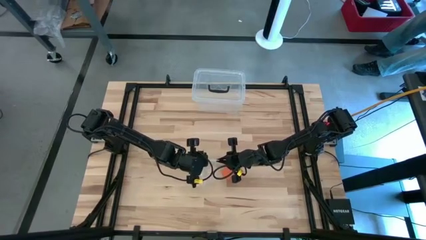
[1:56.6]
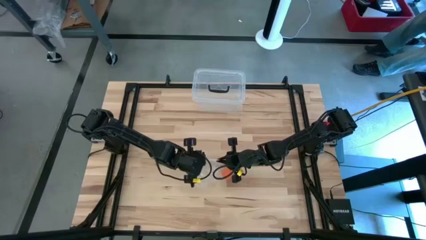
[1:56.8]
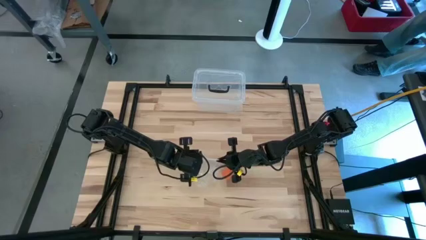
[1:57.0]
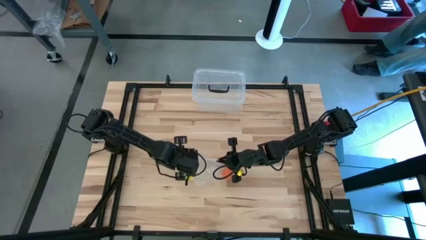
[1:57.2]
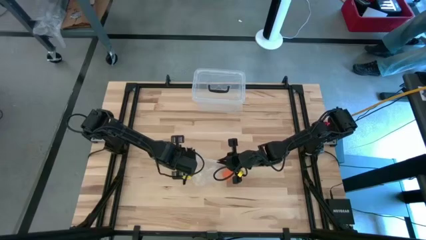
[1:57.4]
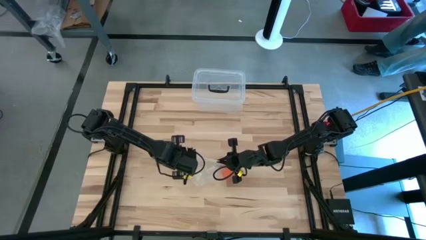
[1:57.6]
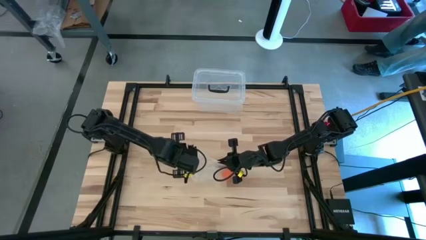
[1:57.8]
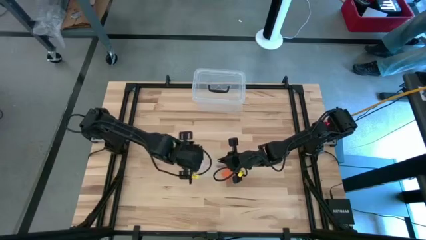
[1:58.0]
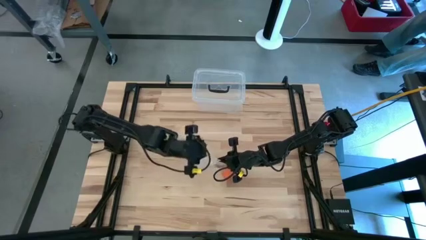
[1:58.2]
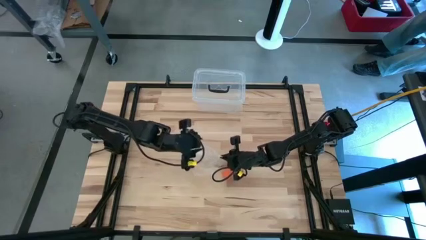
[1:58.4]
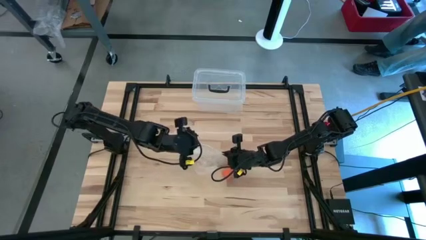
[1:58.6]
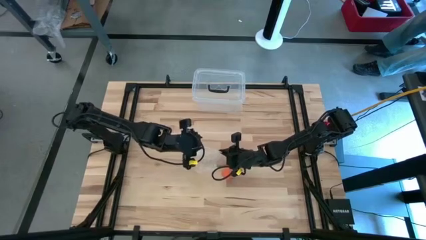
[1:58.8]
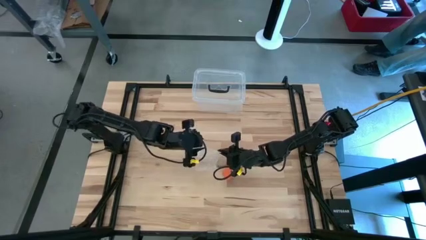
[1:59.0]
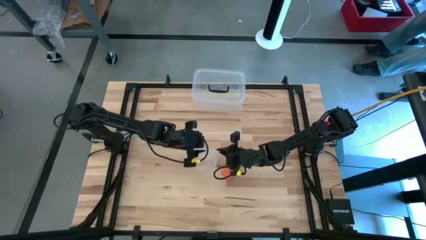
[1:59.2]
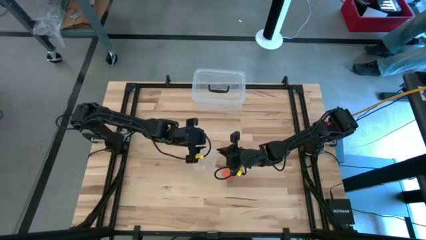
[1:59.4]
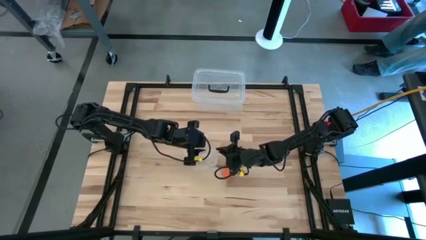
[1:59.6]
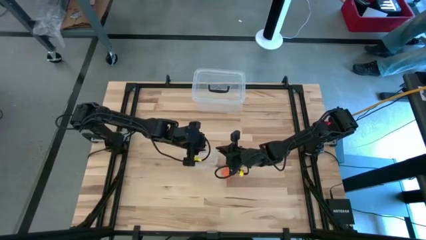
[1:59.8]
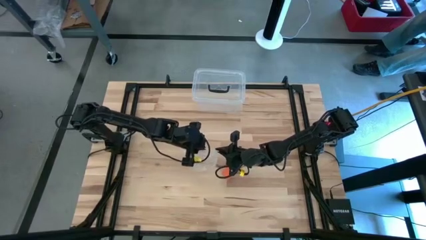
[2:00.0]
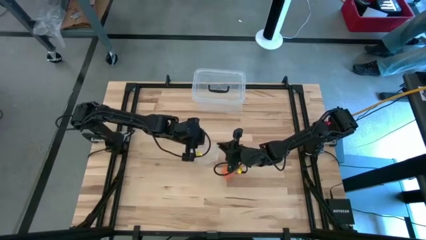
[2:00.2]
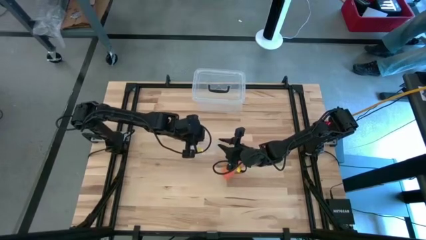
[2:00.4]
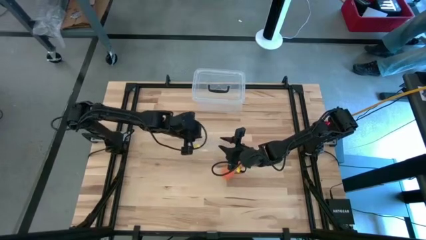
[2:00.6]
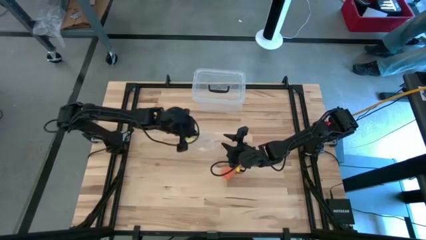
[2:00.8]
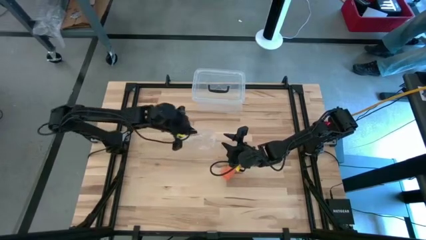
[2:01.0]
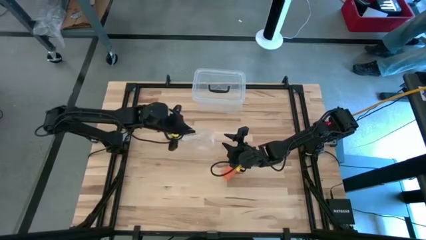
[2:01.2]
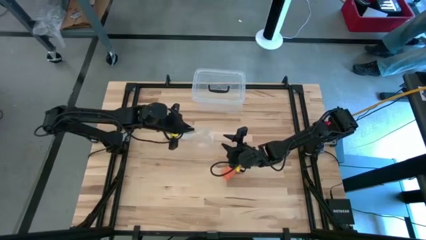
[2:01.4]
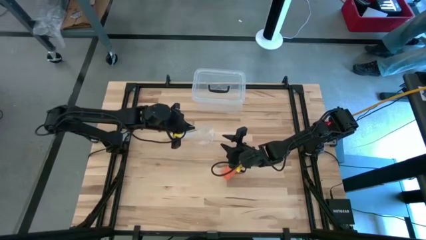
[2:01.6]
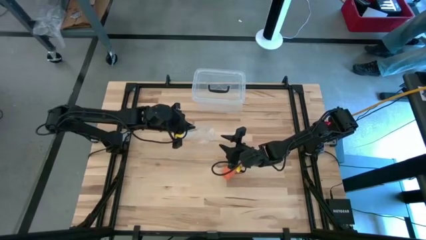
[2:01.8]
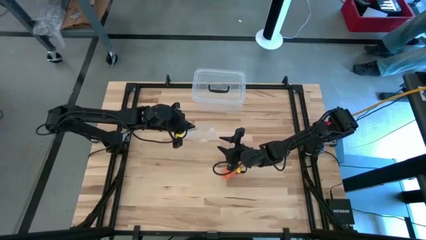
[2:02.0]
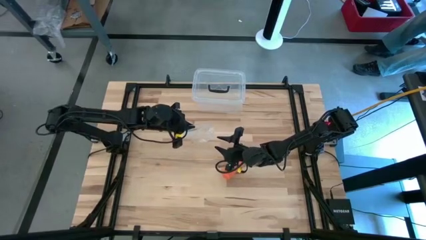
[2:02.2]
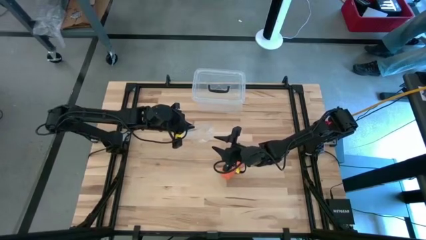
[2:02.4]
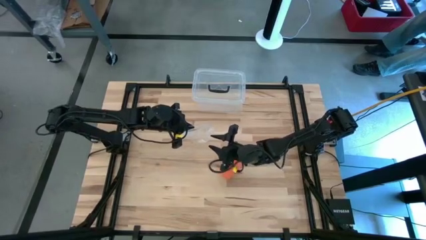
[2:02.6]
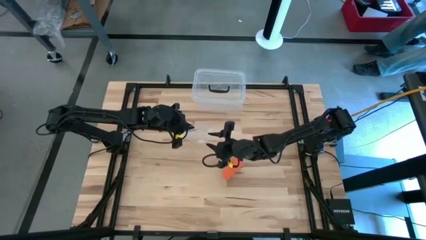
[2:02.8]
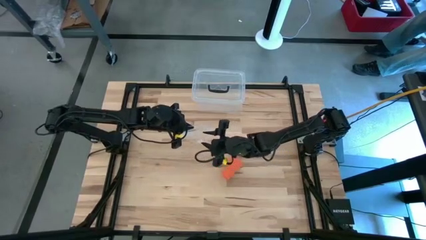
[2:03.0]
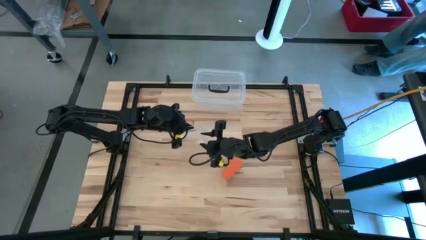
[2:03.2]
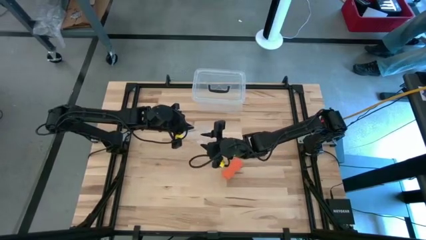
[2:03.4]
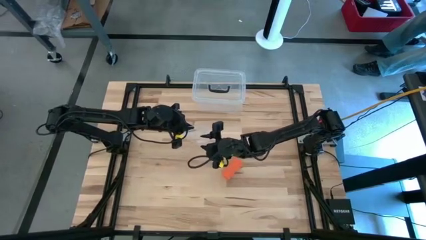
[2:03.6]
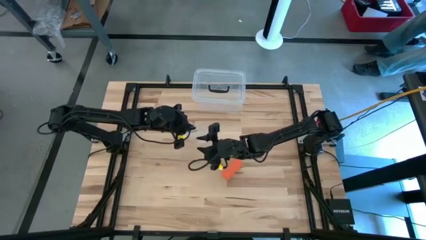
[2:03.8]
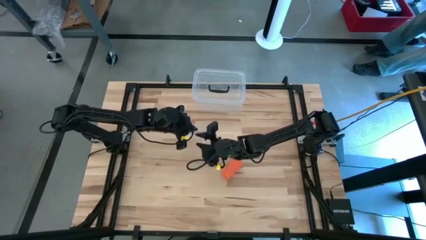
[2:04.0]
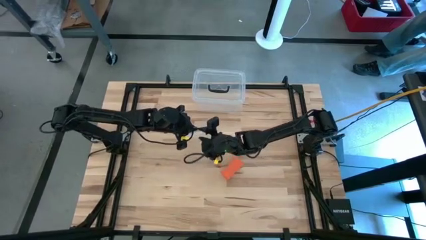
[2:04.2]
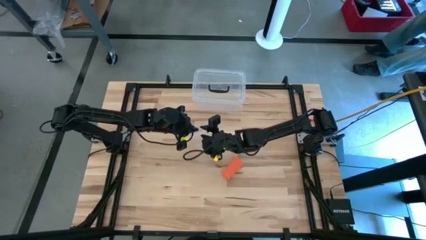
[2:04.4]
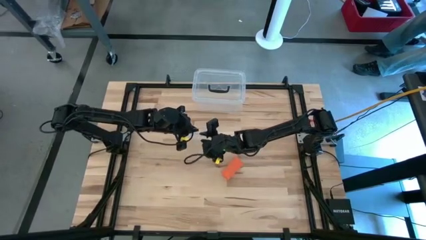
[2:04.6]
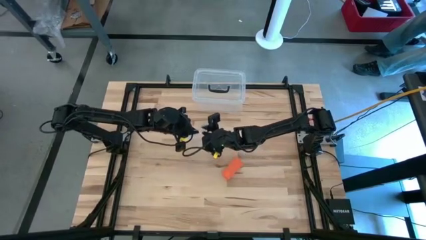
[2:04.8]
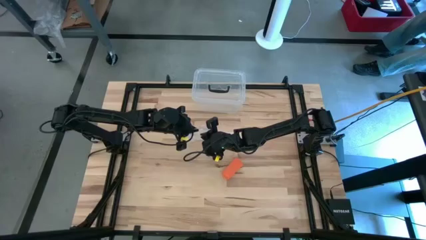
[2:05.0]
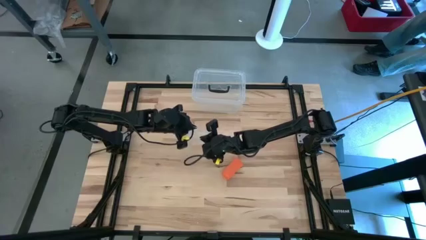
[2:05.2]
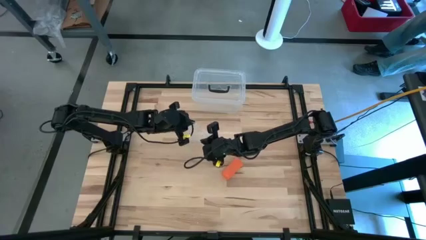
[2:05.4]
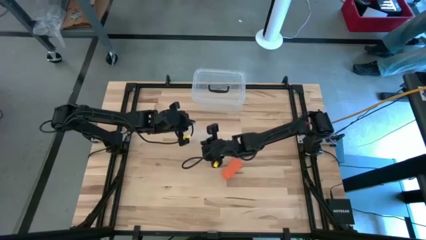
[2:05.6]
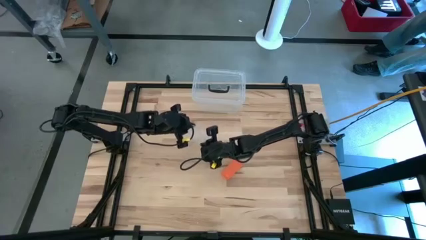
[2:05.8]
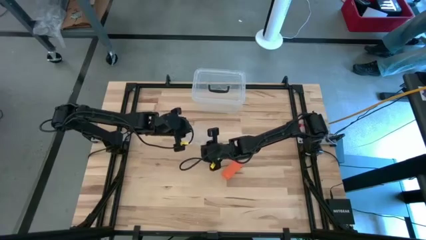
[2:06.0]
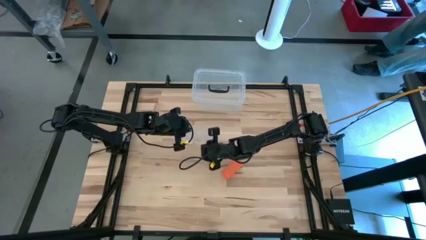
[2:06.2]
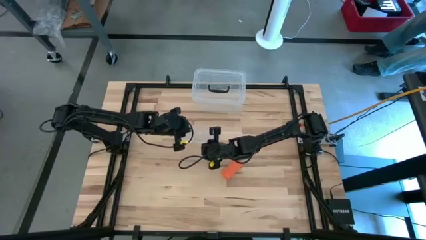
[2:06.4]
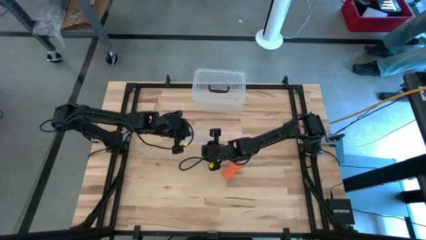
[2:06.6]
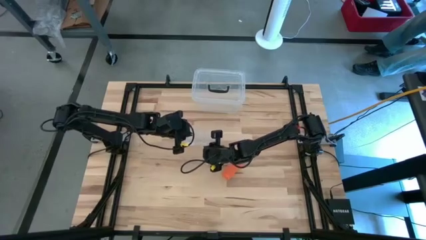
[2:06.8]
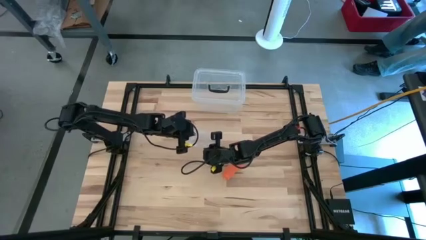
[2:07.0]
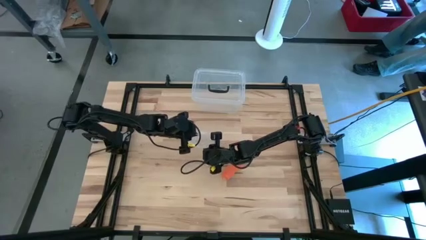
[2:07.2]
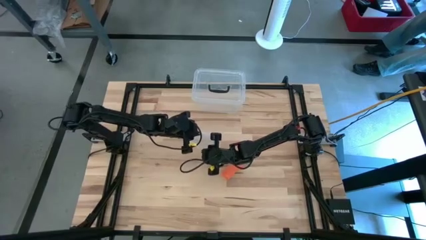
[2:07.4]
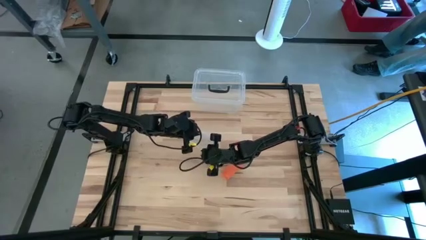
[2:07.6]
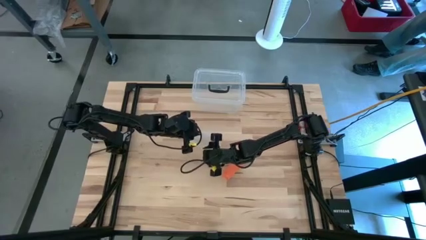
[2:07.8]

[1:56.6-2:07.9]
Task: Roll bandage
Open the zip bag

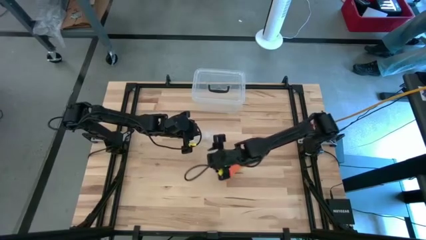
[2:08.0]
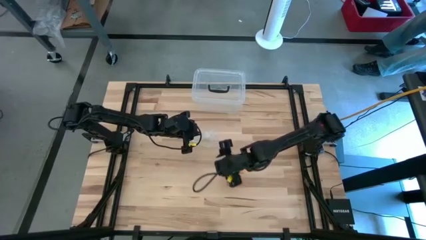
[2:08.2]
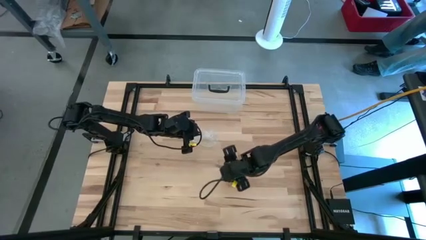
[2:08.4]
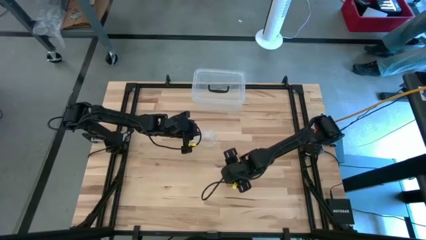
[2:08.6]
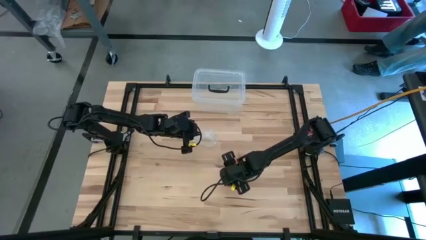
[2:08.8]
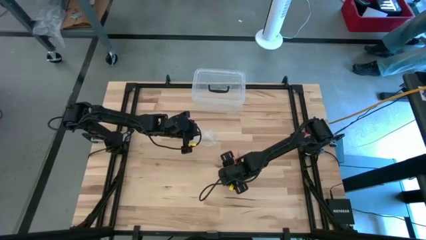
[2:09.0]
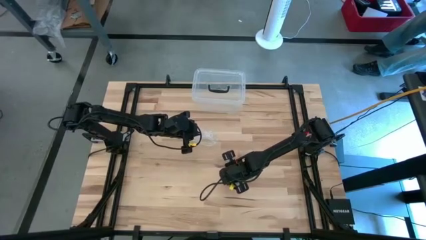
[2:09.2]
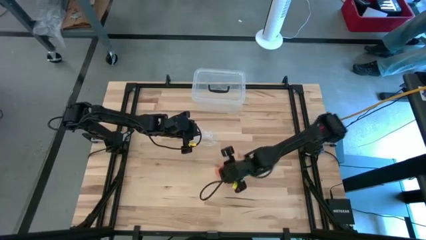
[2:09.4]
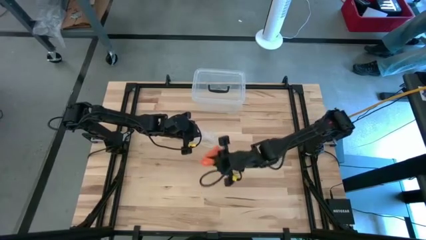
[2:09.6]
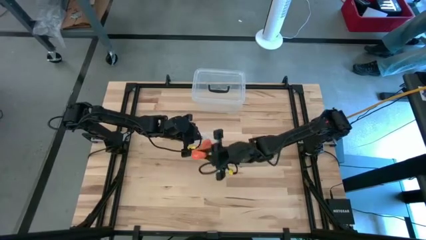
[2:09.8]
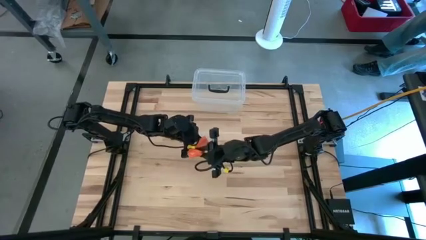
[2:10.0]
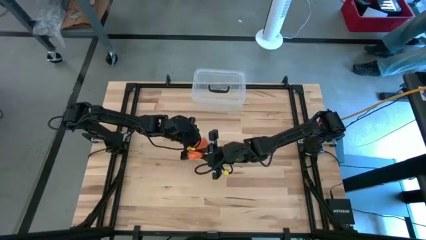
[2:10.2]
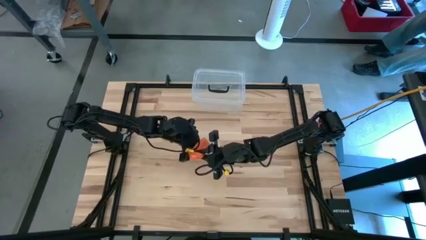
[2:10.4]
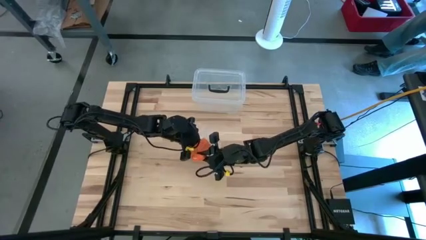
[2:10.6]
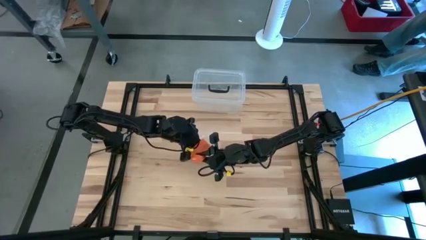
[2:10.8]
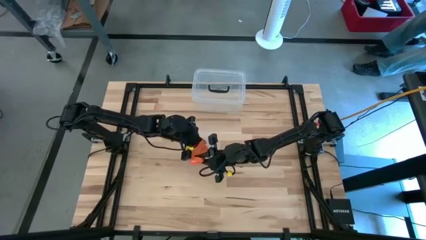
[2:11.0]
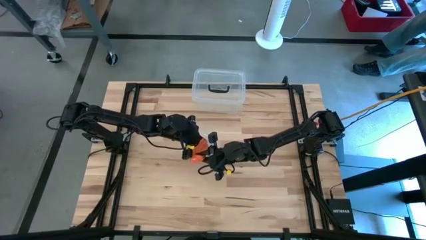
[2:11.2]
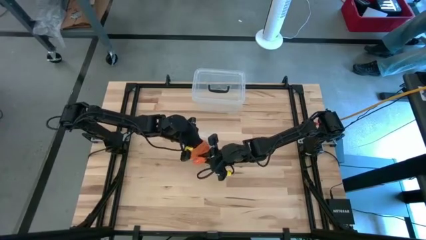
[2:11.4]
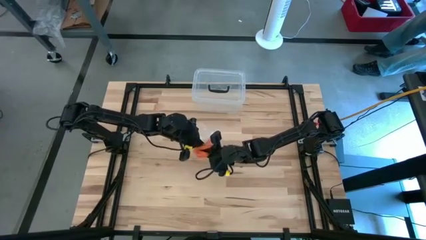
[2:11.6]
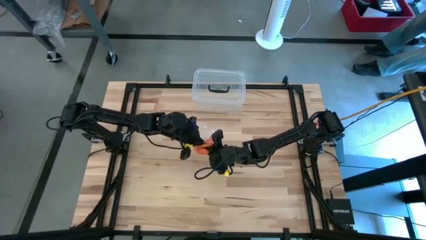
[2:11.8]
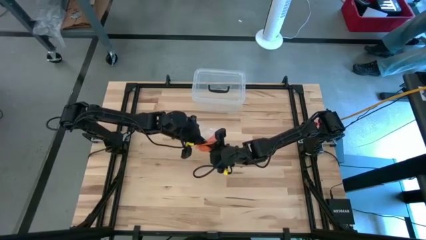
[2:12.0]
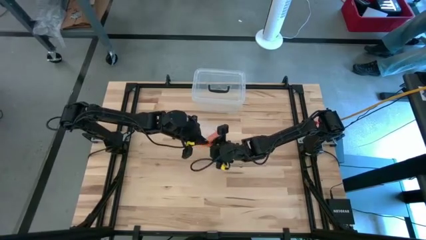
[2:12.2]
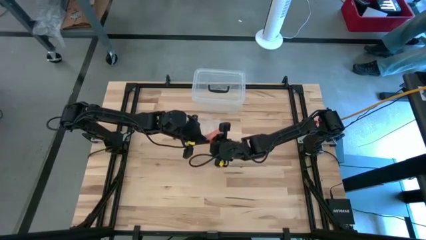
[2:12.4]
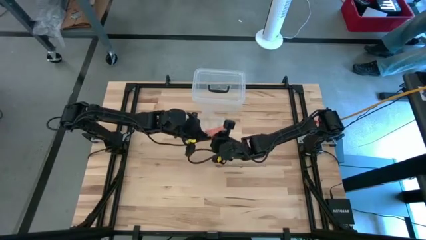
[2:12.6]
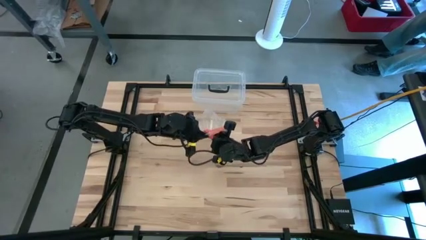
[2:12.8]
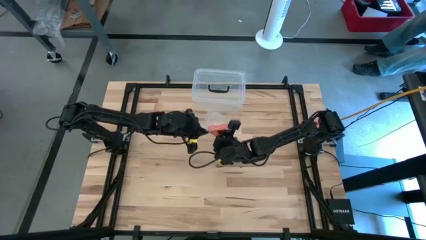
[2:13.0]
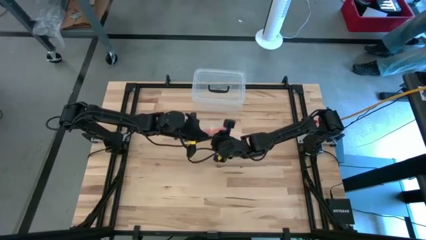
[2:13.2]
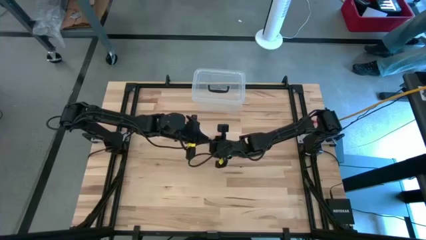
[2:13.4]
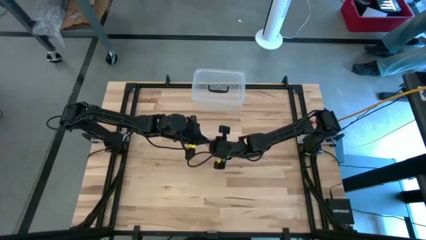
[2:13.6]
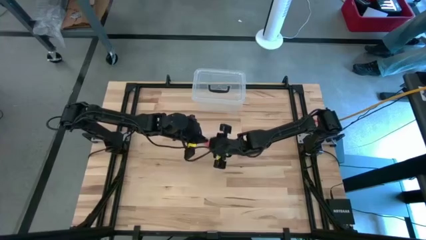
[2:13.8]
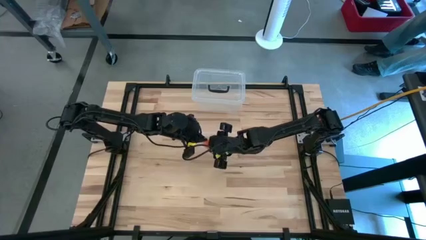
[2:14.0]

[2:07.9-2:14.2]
Put the orange bandage into the zip bag
